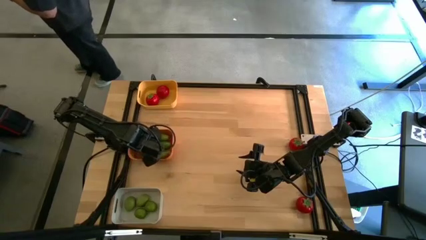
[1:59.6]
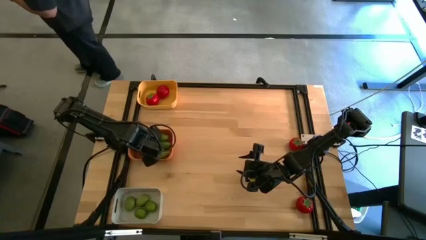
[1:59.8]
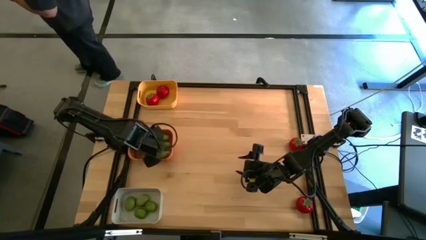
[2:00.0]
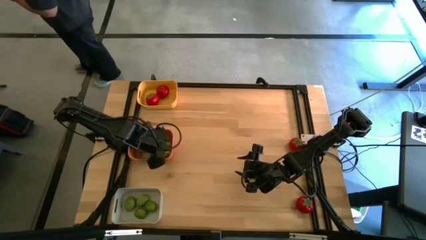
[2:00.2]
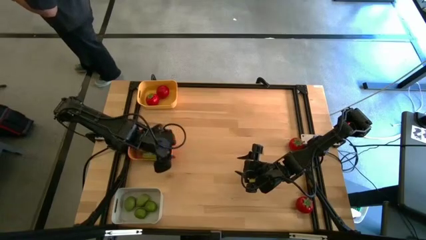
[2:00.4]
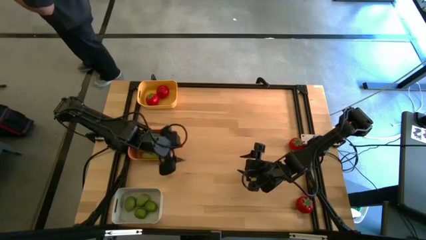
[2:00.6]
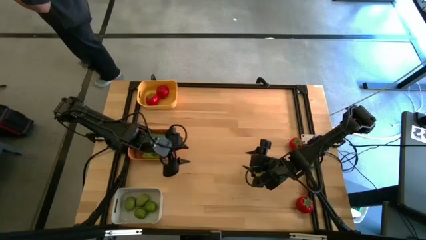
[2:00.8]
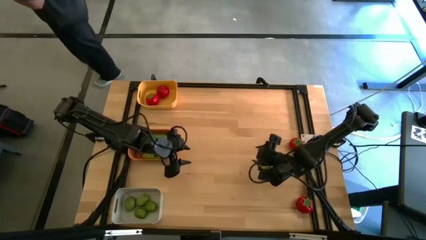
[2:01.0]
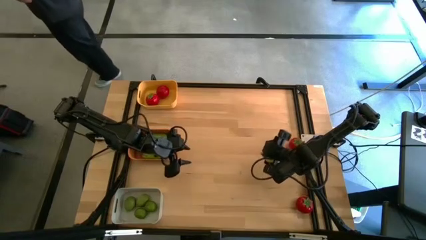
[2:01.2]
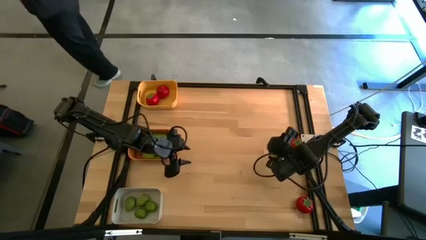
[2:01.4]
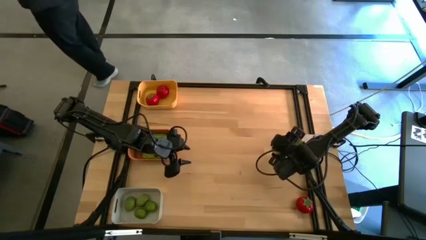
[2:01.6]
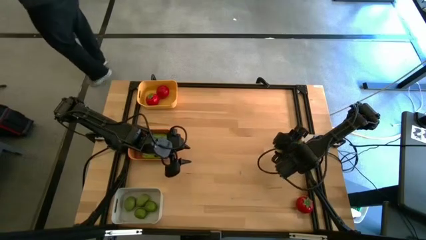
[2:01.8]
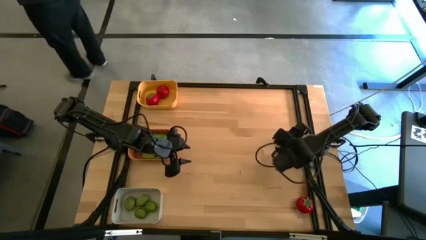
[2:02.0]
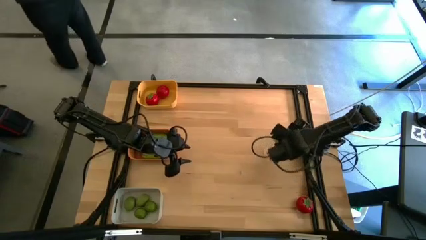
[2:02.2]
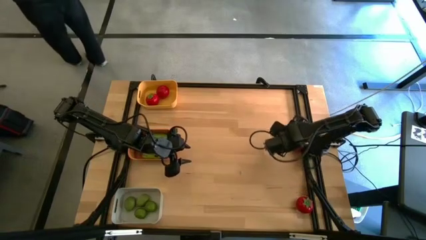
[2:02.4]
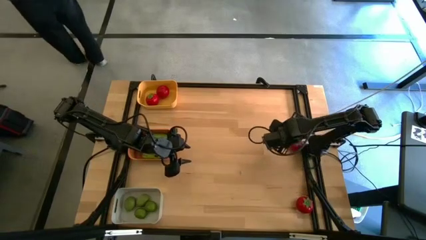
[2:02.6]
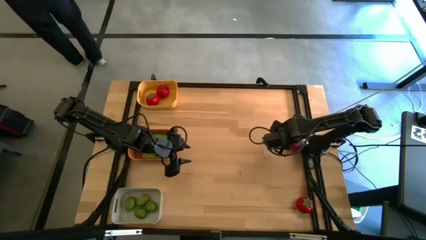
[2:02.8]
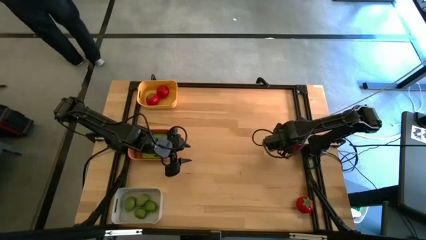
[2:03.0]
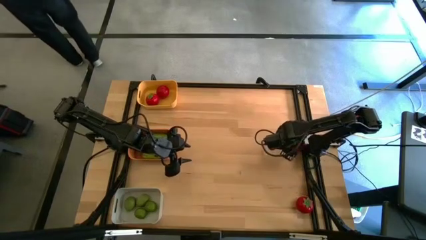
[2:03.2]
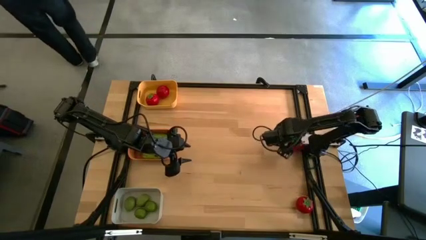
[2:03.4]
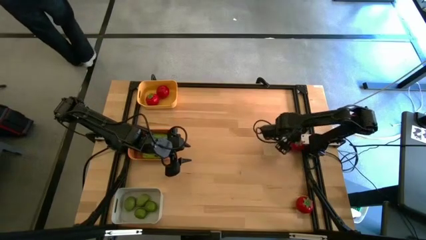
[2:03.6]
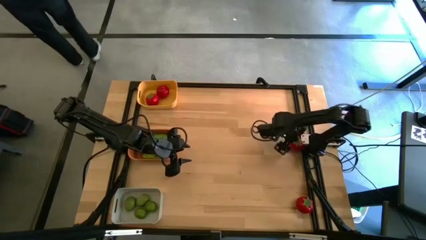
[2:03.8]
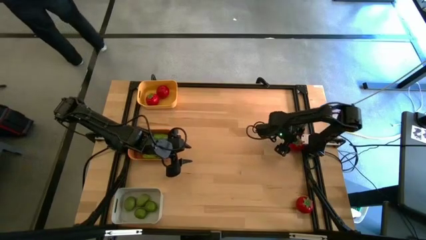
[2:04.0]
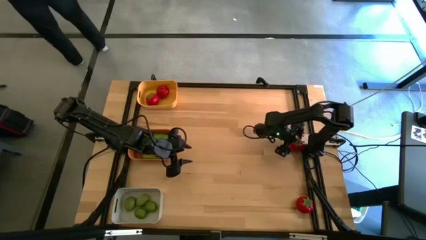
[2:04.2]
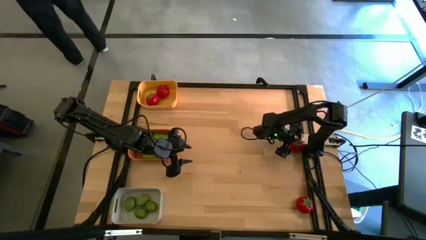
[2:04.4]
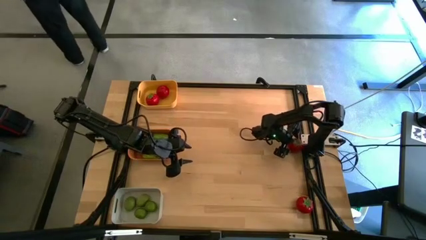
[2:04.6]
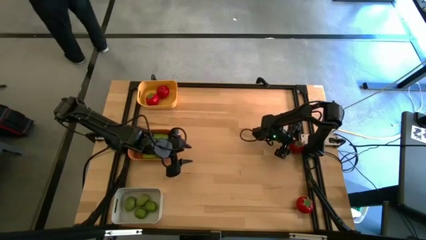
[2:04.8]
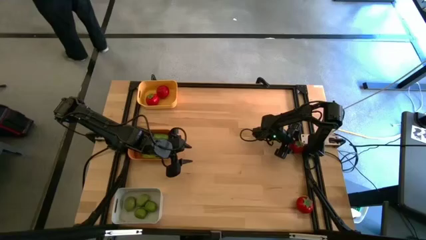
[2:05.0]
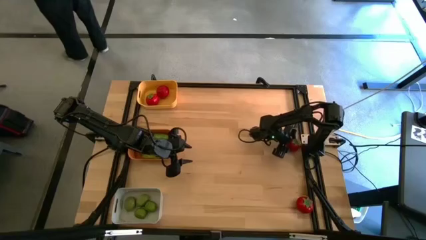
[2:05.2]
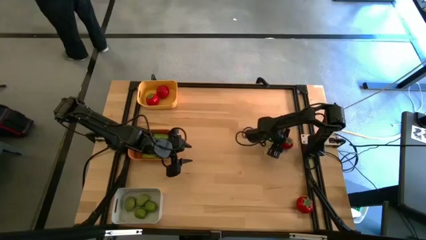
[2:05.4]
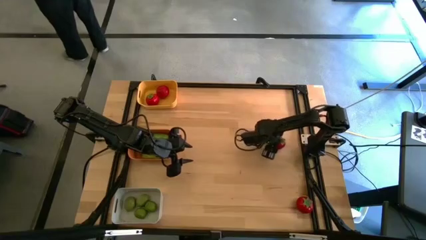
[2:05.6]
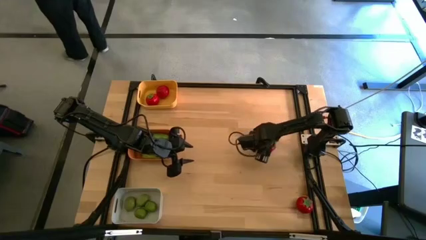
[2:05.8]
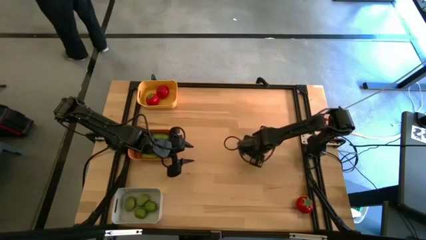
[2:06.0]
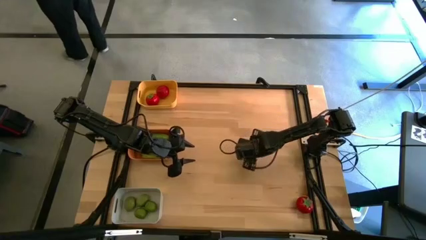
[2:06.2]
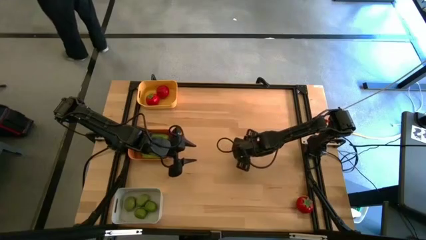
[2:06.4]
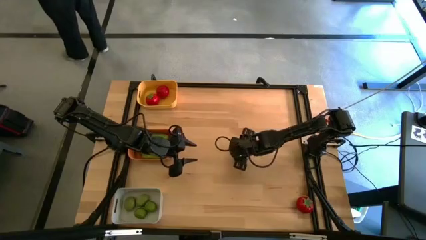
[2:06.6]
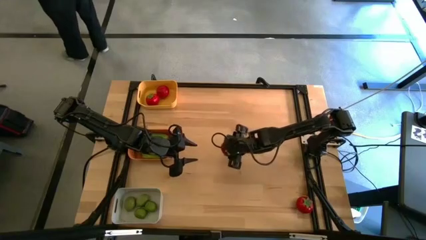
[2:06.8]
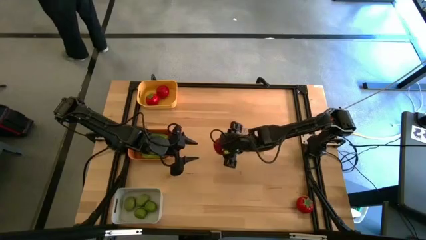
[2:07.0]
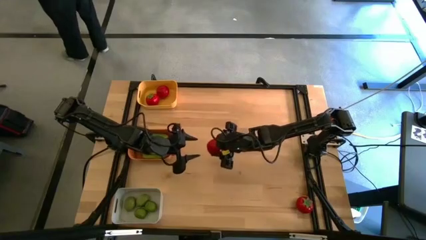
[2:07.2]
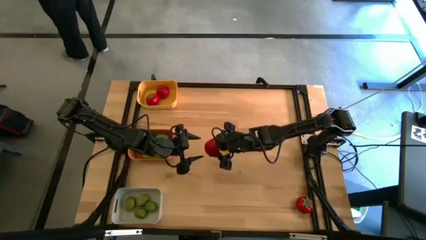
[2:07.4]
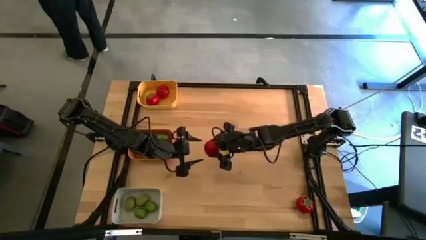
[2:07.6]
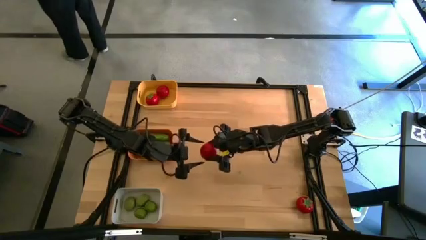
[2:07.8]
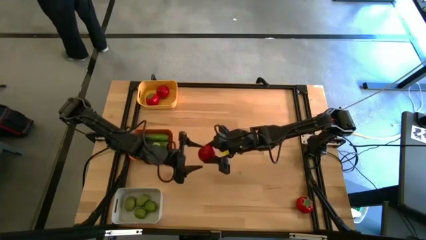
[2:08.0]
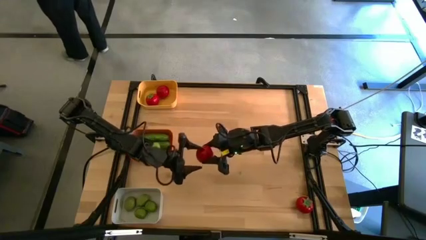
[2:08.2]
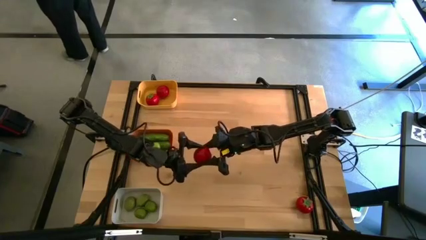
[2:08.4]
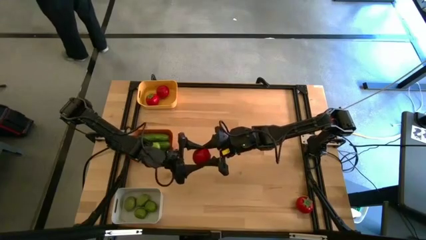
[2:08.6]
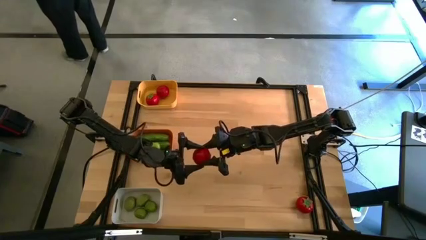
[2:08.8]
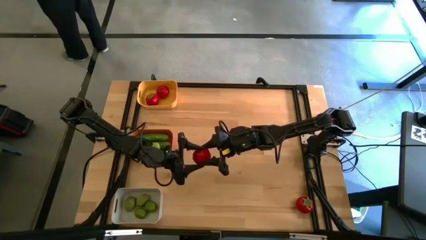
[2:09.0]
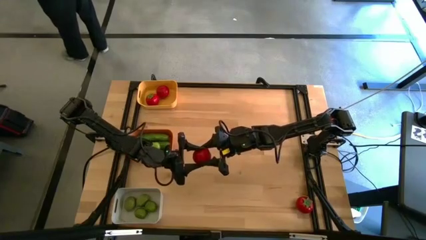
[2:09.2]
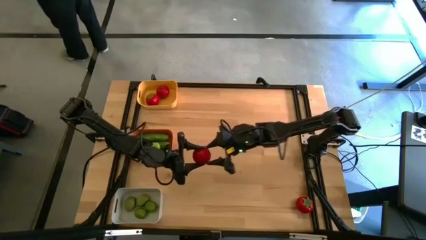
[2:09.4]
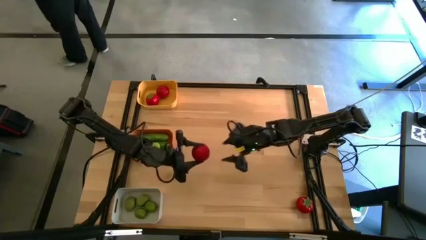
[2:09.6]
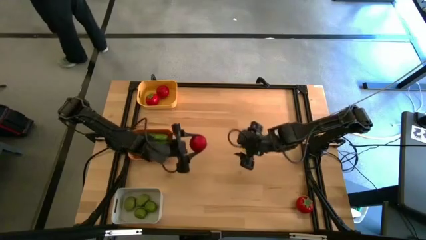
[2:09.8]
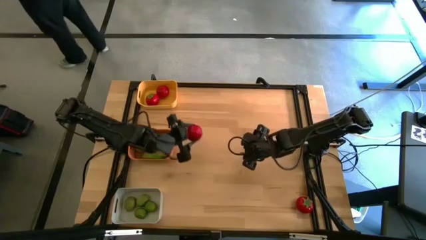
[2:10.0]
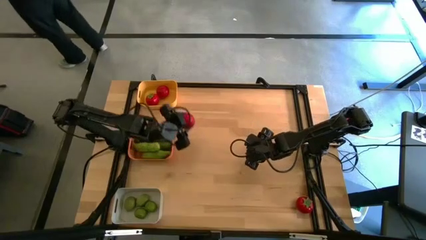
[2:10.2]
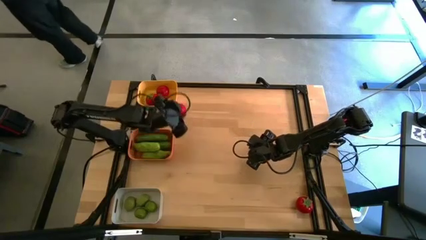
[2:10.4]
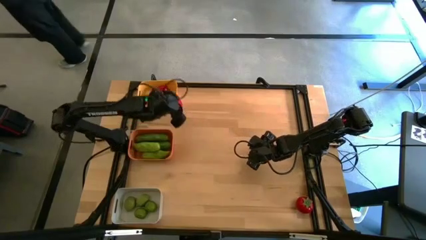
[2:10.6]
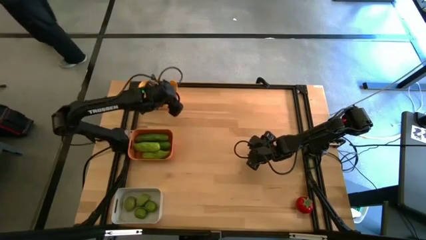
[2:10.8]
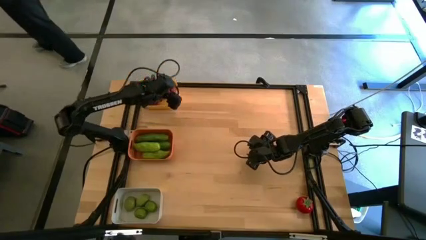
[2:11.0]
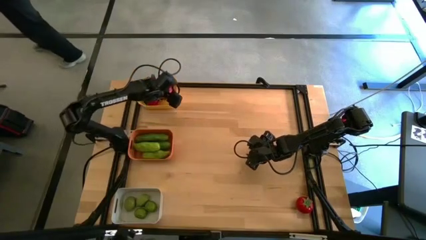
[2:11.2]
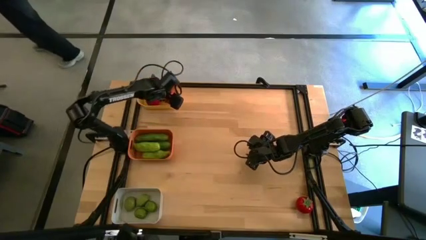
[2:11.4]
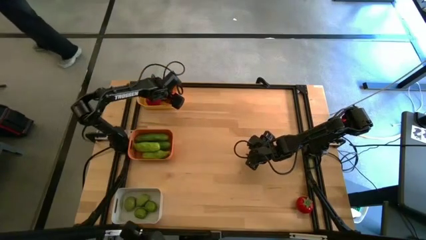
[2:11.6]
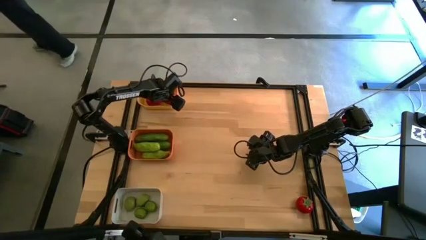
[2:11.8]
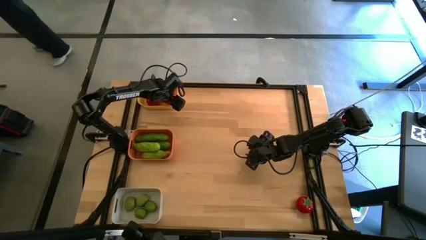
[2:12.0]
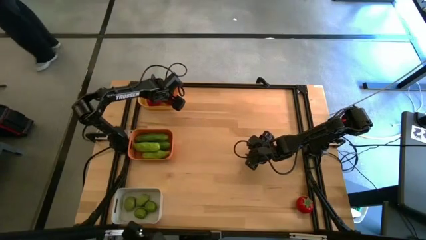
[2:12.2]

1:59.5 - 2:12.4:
Task: Sort produce into baskets
Put the tomato into the yellow bin

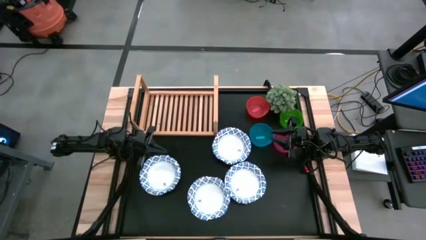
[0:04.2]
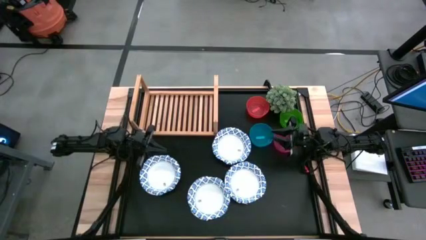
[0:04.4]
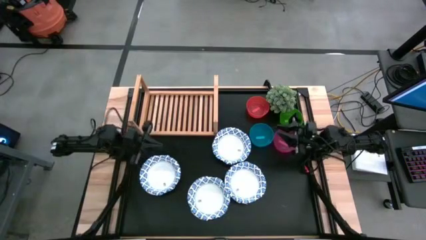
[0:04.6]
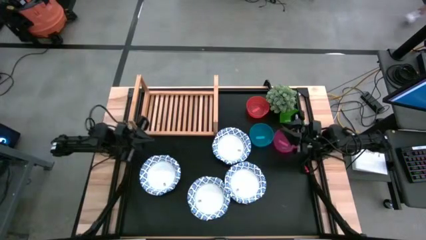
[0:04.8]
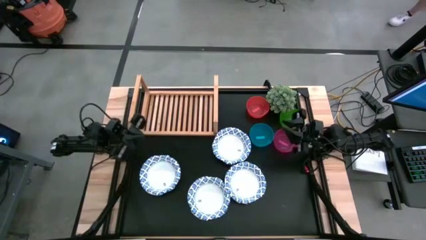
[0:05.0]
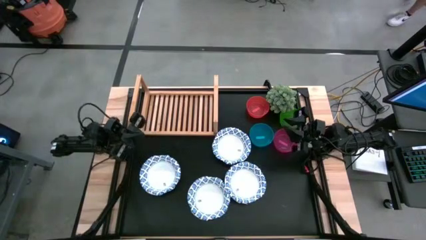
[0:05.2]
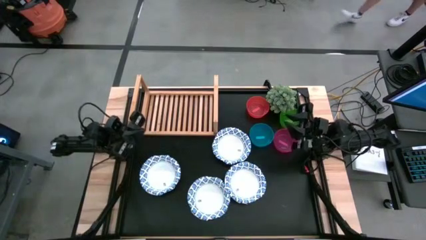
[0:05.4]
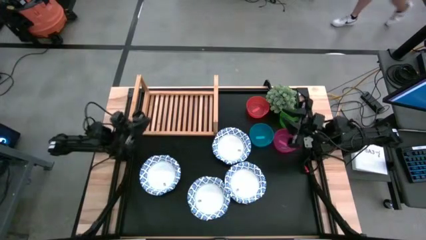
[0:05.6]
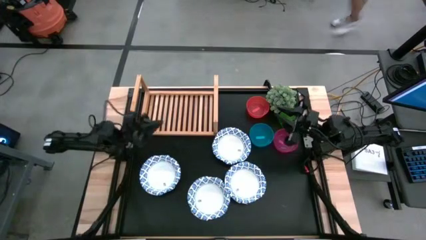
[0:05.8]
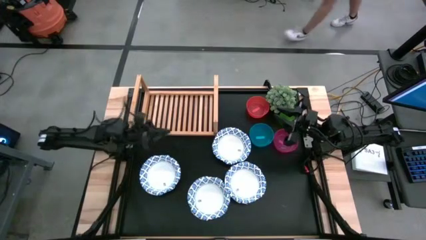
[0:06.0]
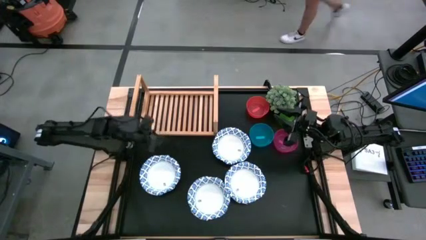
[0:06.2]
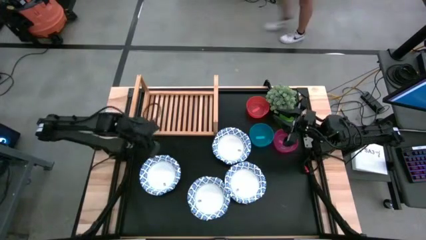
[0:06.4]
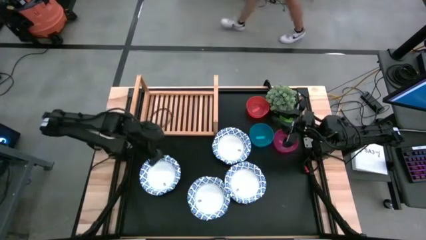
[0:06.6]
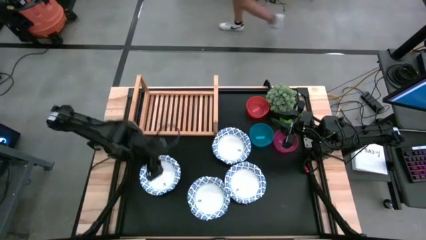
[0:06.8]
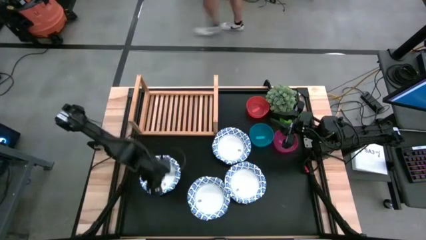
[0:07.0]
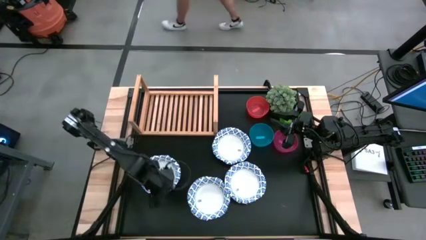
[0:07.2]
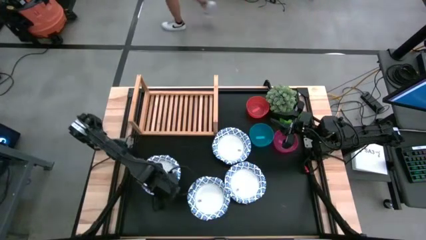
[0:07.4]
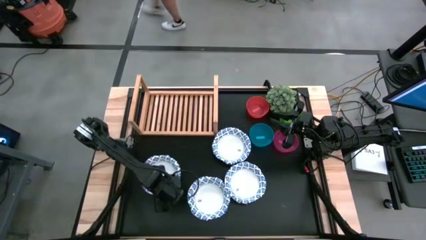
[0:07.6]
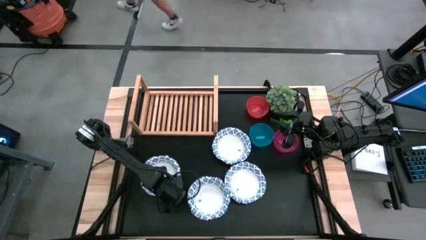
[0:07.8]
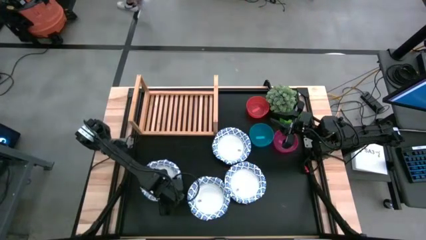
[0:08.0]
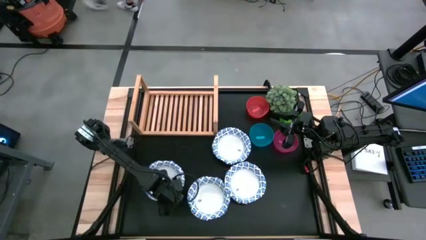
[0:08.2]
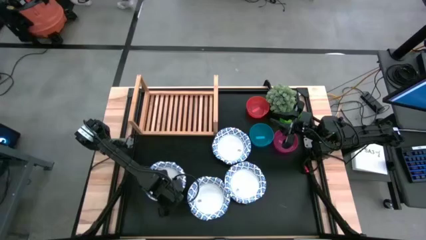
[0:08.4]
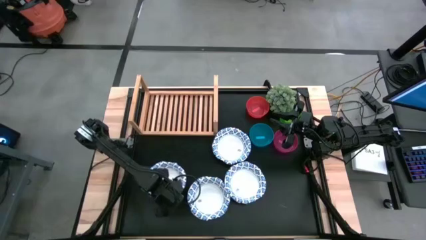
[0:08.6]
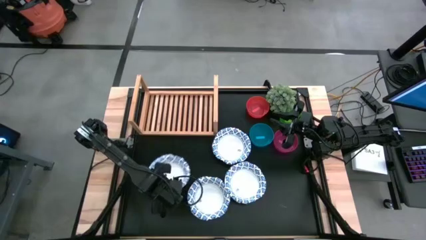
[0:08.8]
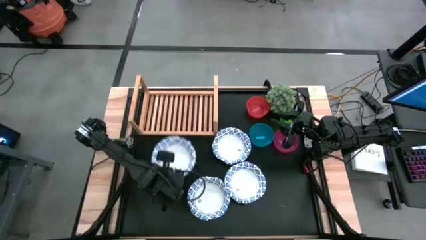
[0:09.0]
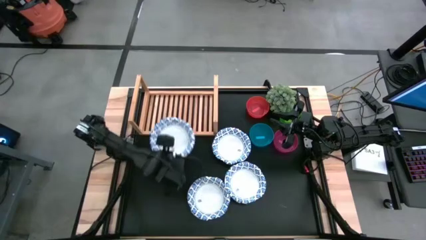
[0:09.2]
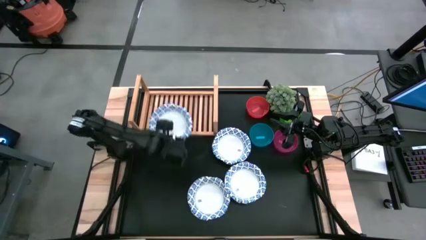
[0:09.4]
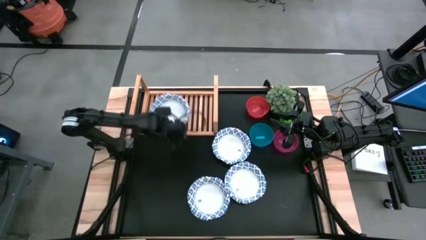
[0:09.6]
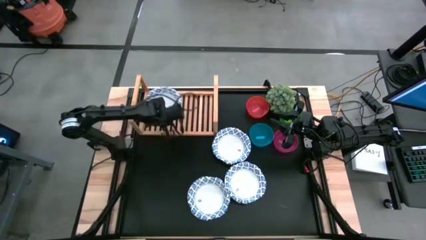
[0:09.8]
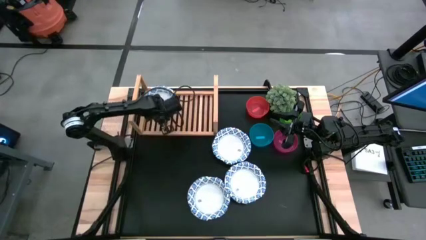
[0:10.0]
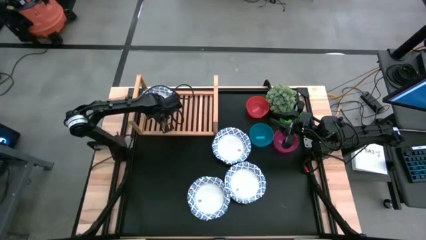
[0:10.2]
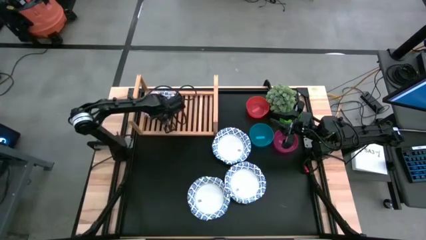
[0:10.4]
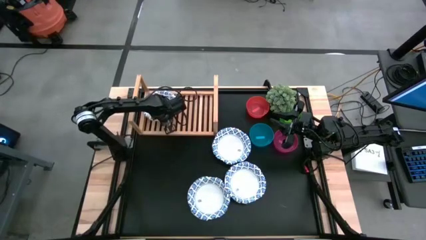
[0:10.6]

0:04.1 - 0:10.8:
Task: Place and stack plates onto a shelf
Put the middle left white and blue plate on the shelf
